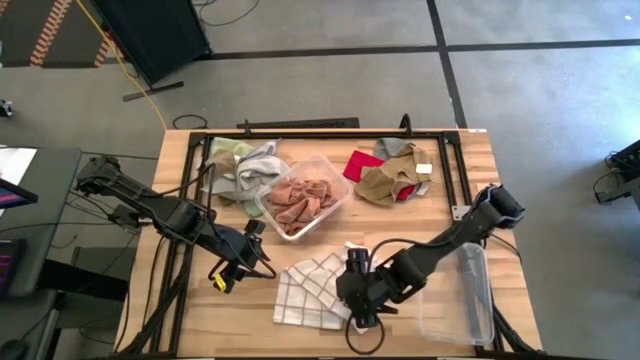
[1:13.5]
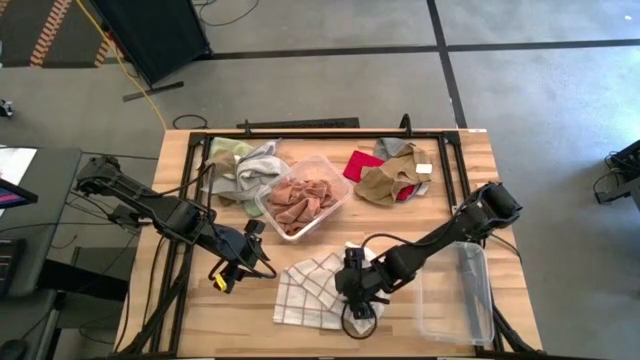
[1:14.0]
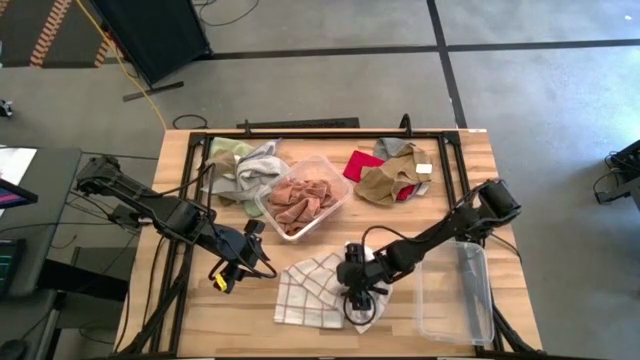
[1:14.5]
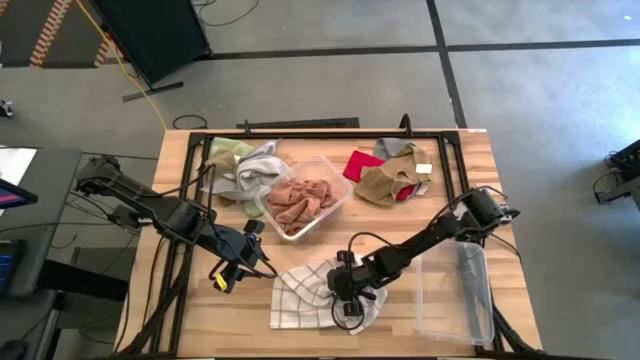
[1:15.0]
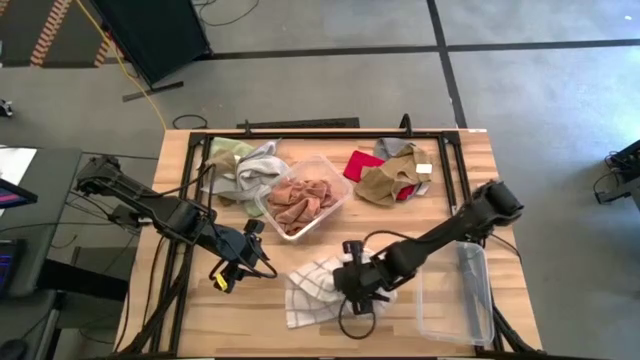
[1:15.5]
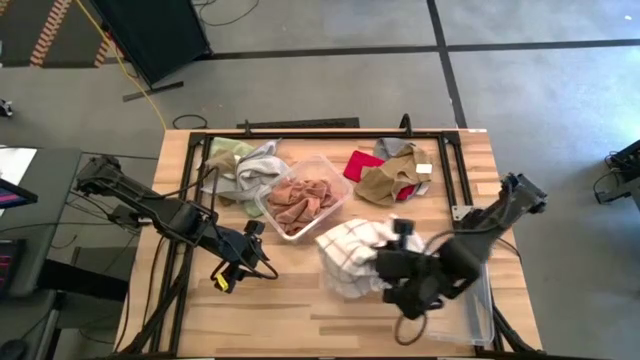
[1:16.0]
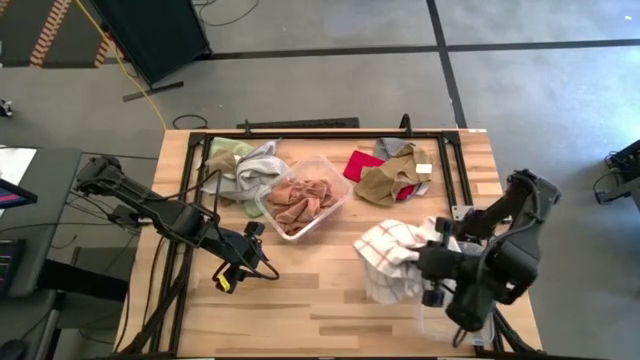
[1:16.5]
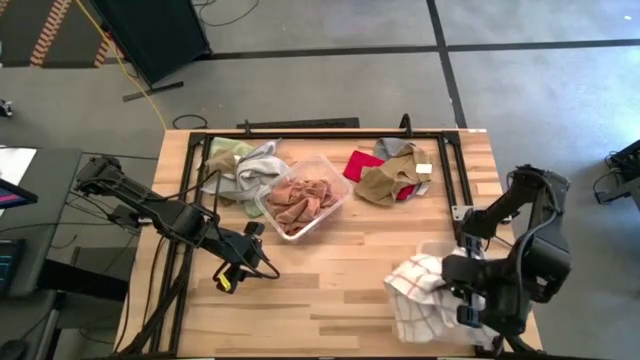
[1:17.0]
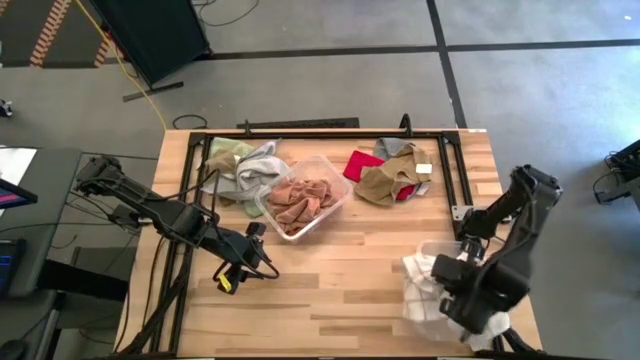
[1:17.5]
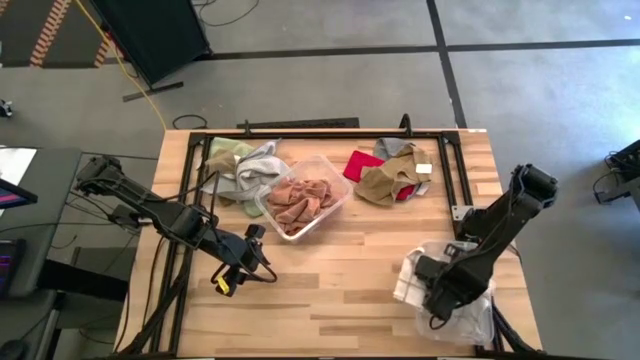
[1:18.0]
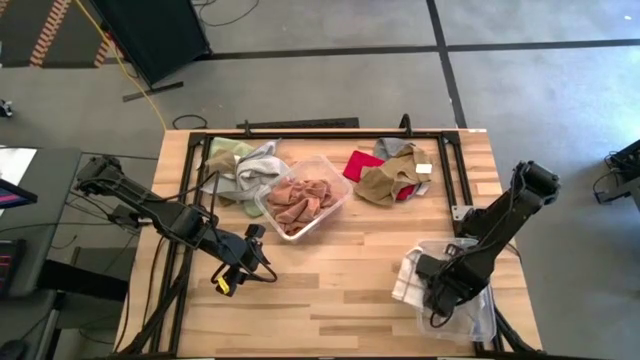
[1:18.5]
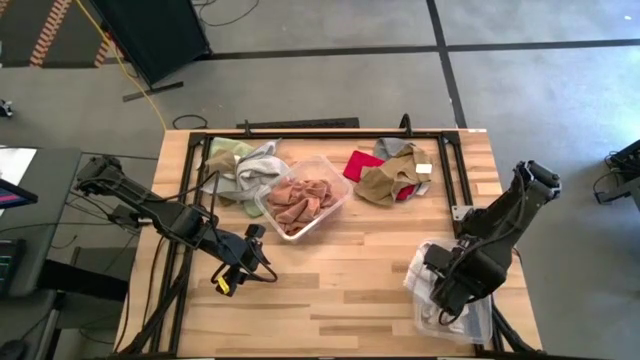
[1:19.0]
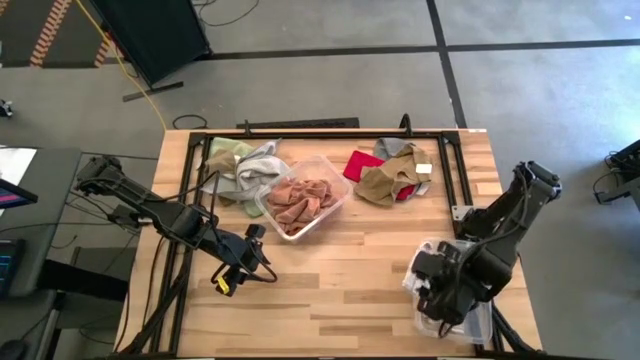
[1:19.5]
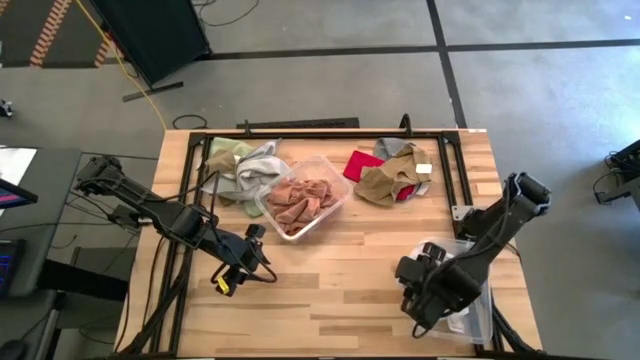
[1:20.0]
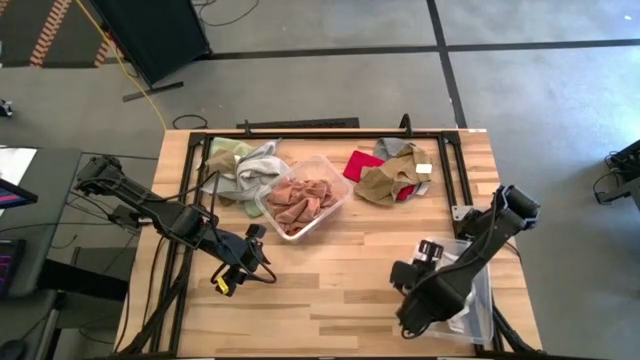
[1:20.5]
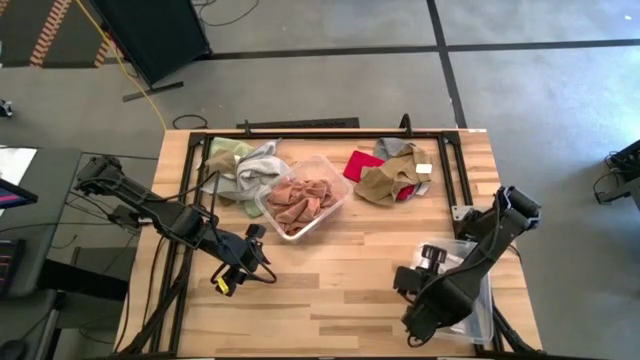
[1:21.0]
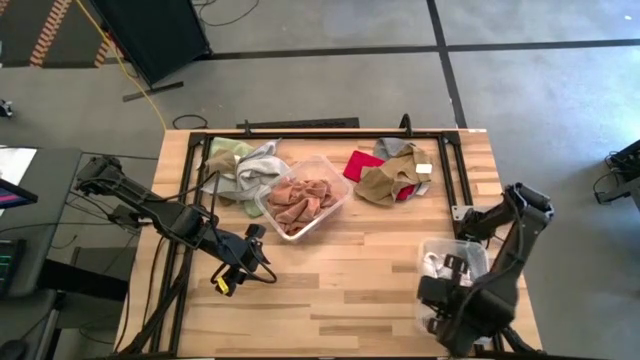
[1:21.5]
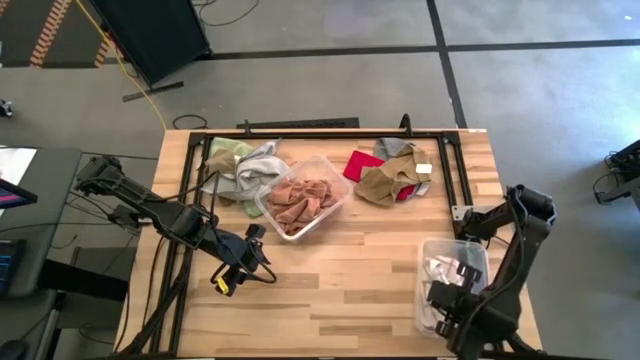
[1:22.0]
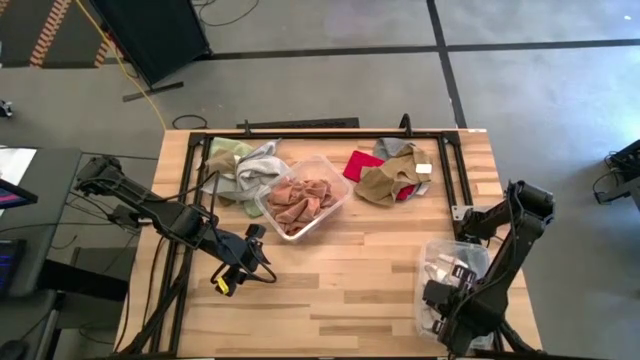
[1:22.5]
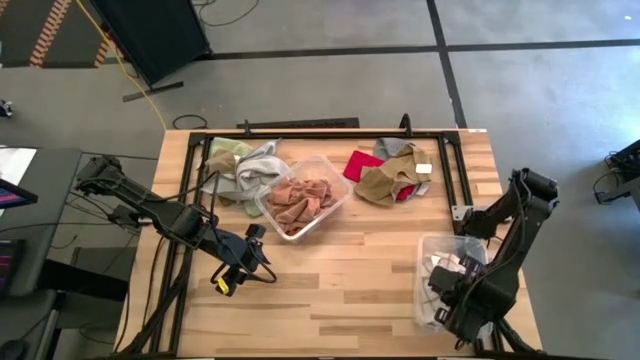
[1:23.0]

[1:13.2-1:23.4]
Task: Sort towels by color in basket
Put the white patterned towel into the bottom transparent bin

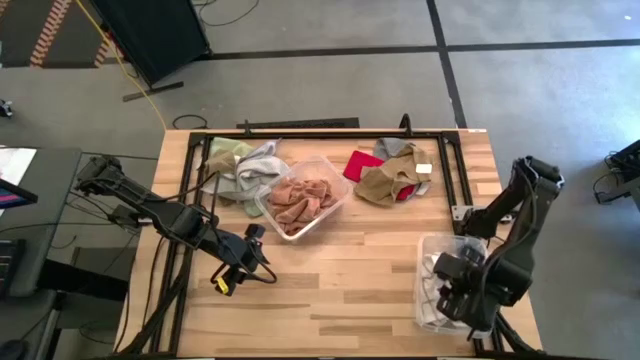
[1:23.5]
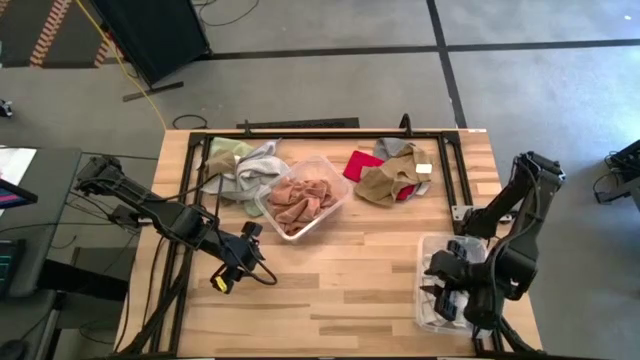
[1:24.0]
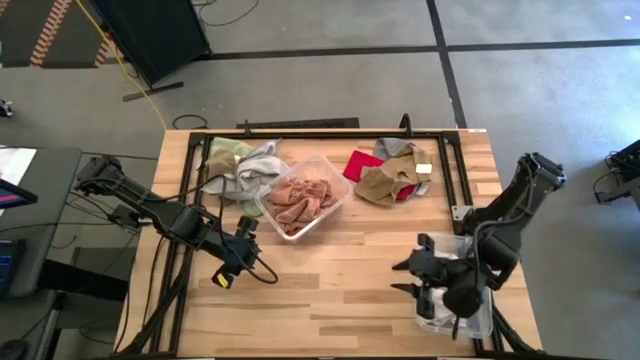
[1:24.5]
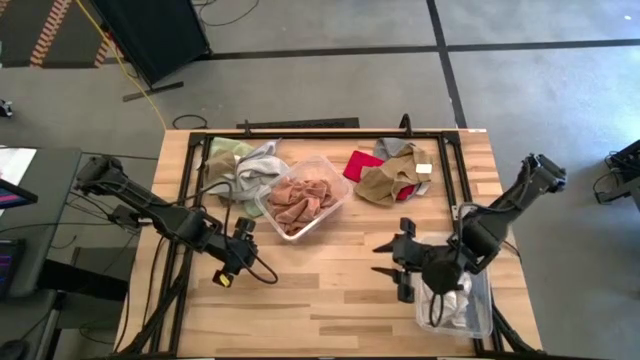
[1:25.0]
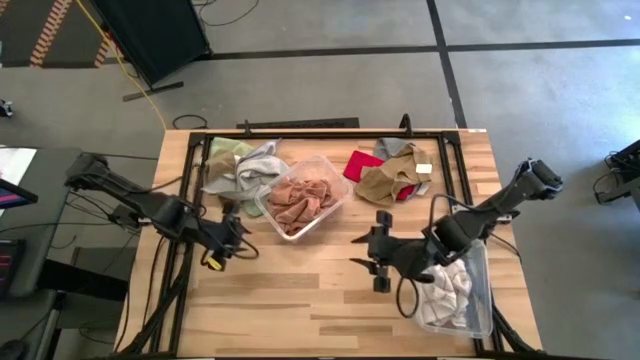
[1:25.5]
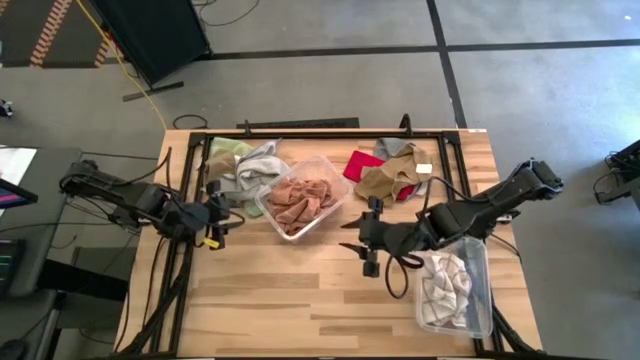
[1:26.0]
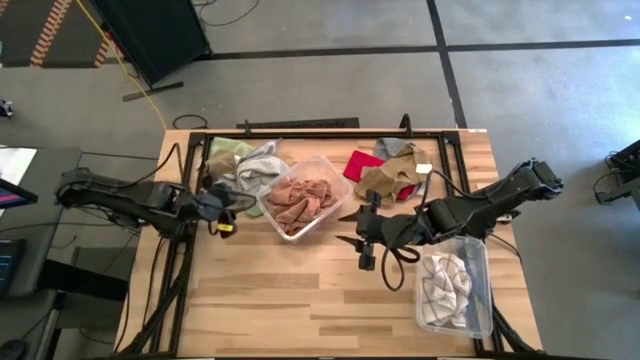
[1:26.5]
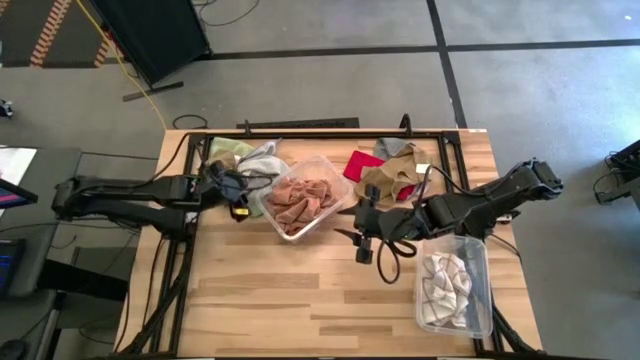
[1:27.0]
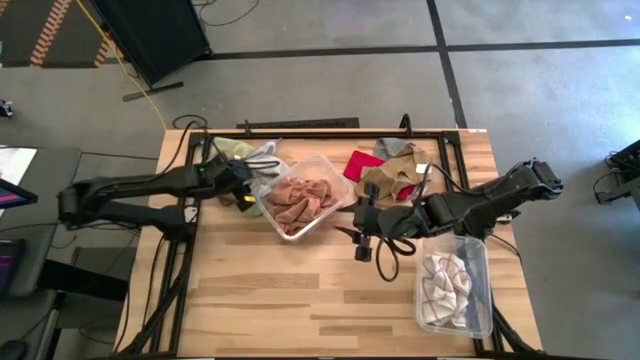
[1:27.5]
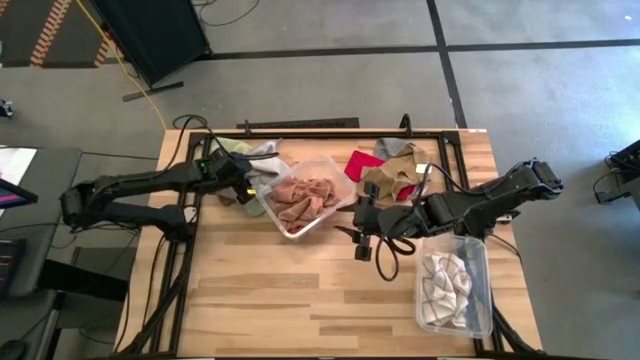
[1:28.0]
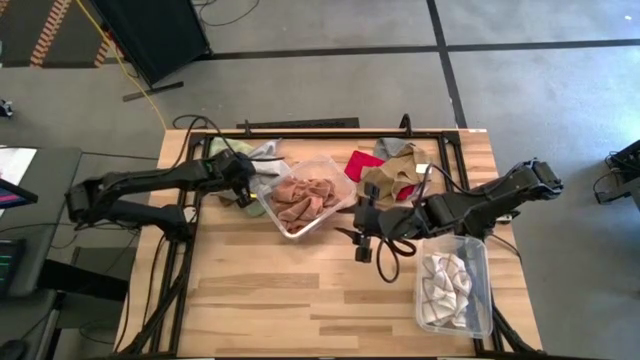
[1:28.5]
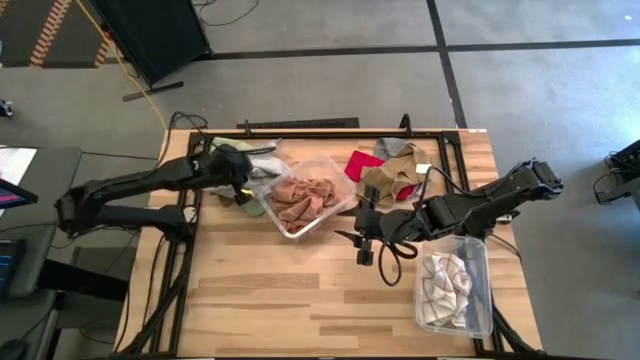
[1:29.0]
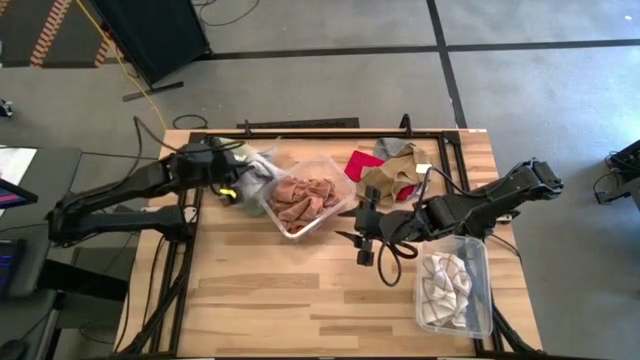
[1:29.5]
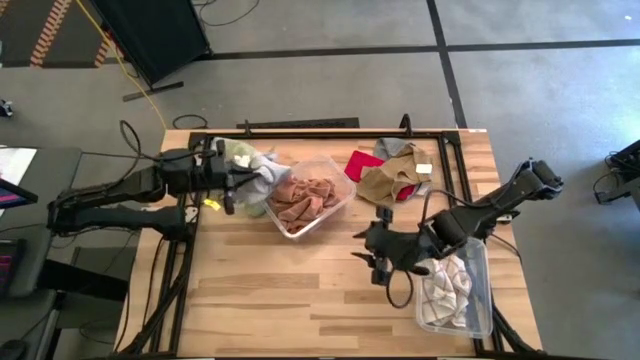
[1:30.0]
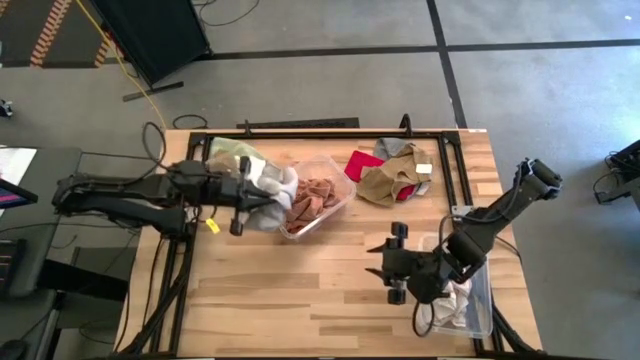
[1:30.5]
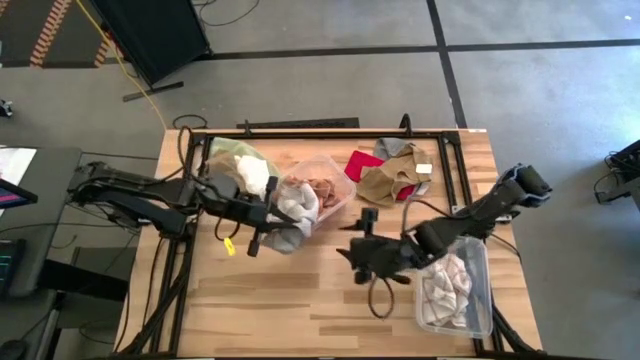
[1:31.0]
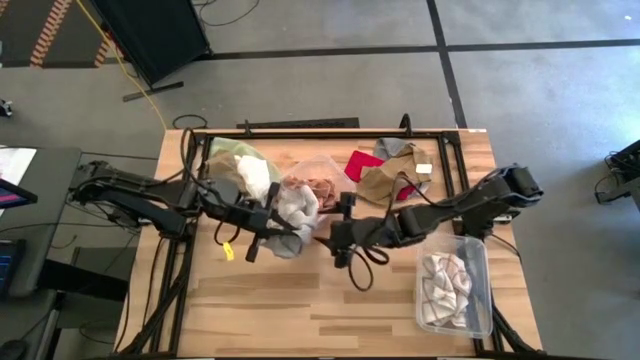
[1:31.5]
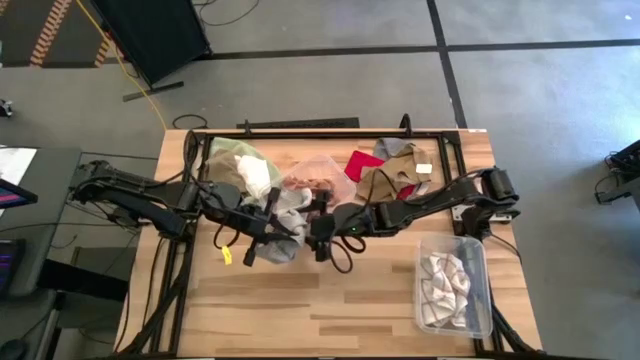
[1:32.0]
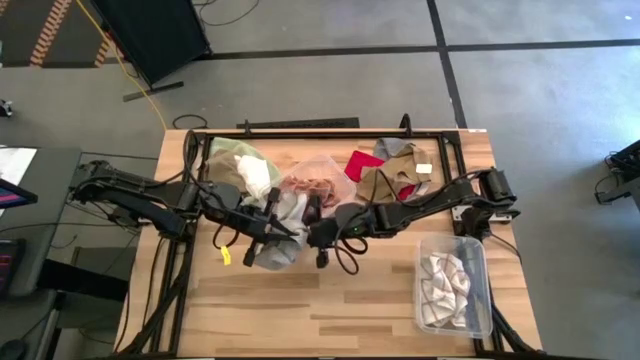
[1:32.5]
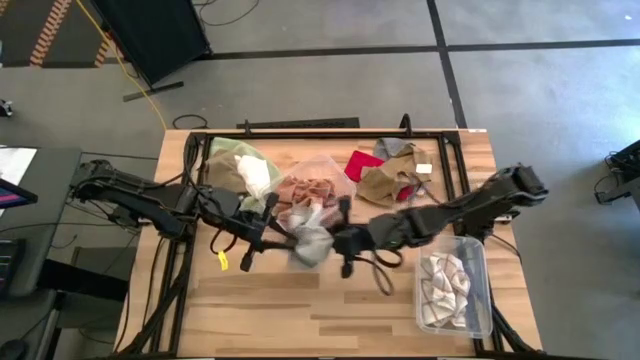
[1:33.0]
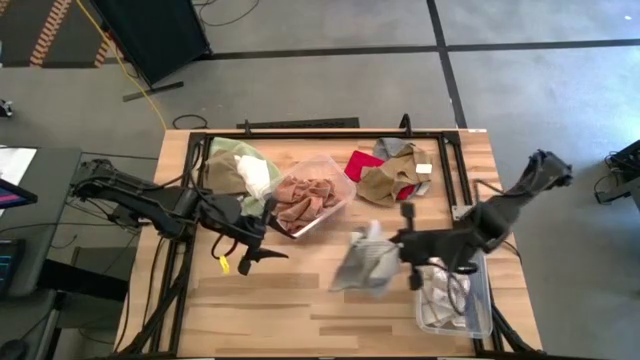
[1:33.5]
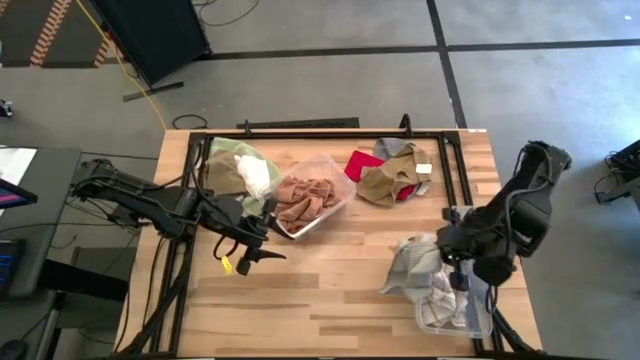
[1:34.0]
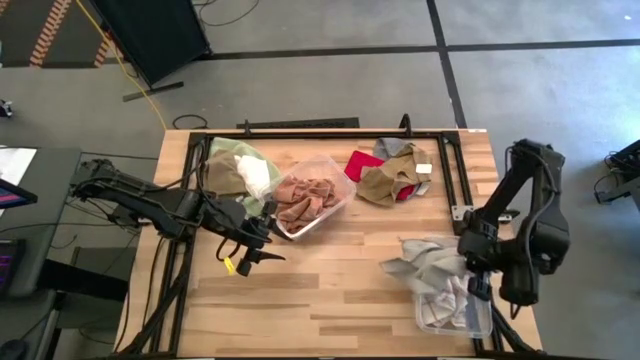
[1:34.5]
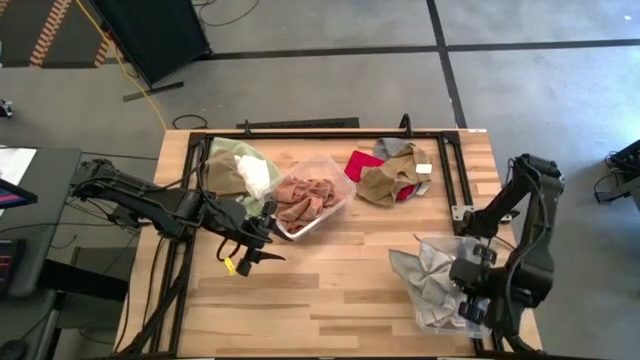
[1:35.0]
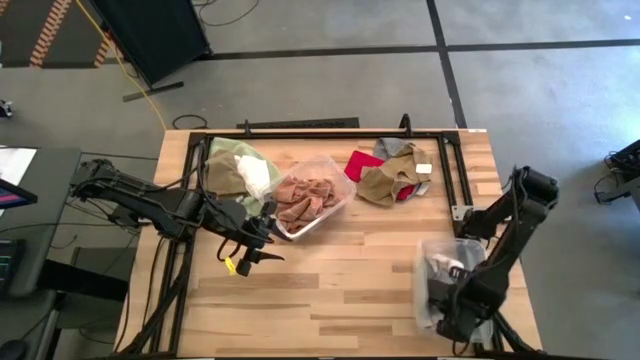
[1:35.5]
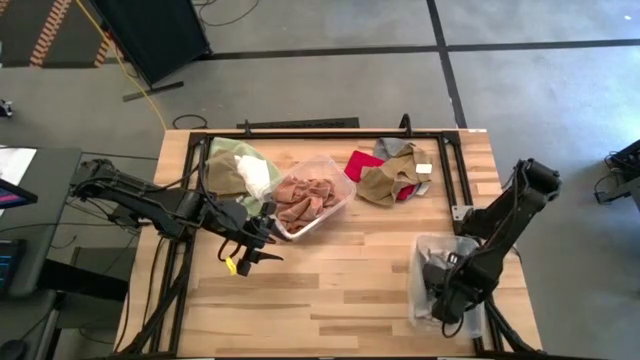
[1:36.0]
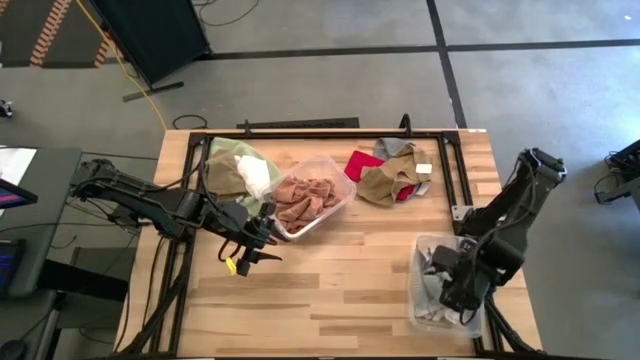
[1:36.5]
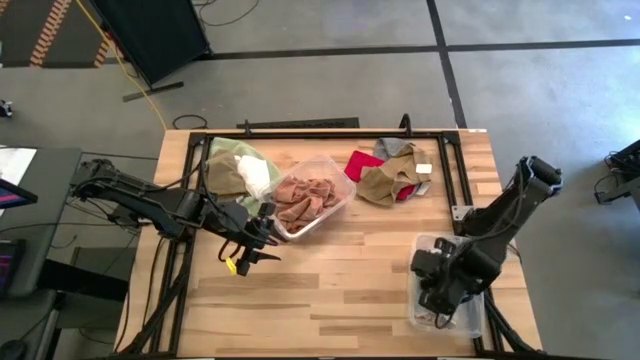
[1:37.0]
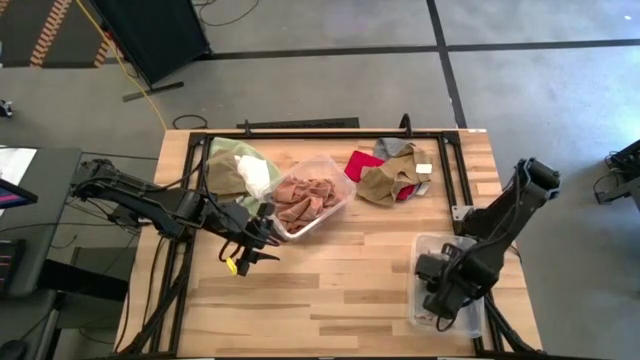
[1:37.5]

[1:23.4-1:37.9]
Put the gray towel into the bottom transparent bin
